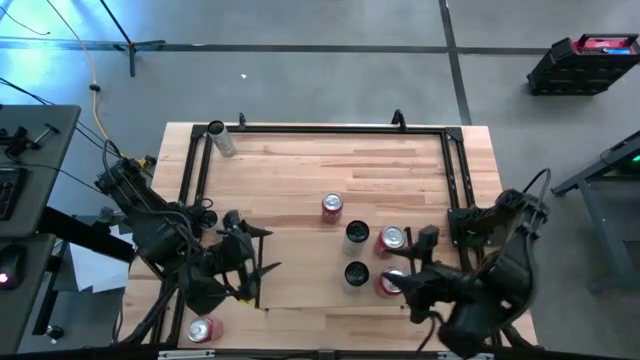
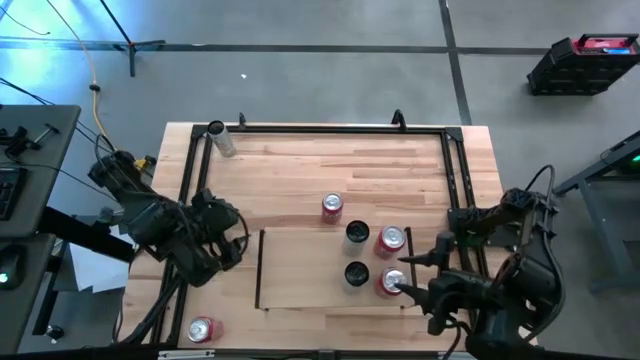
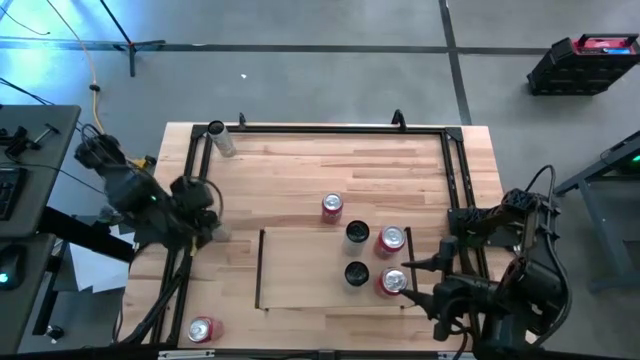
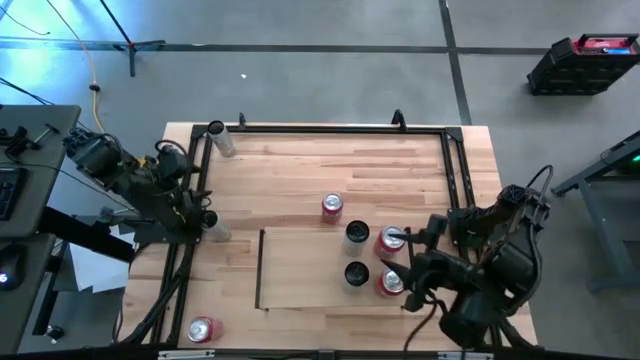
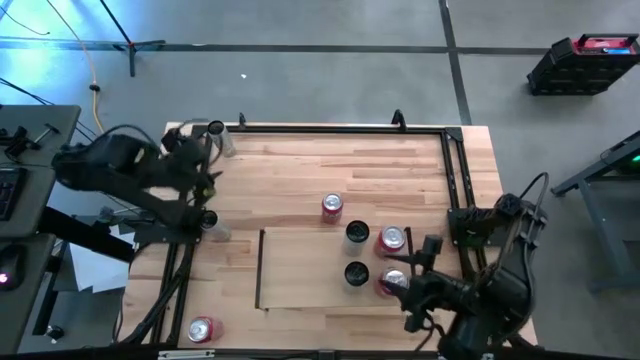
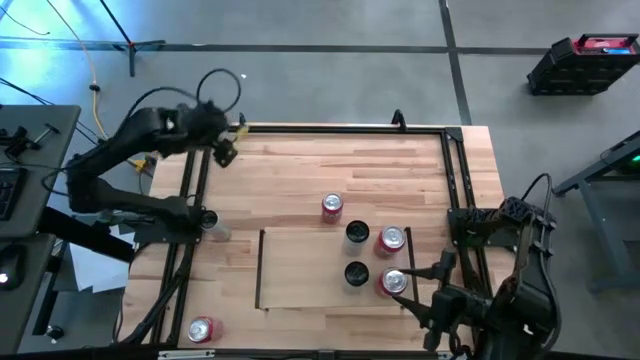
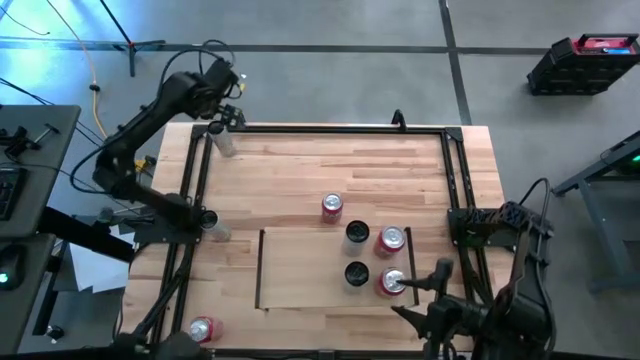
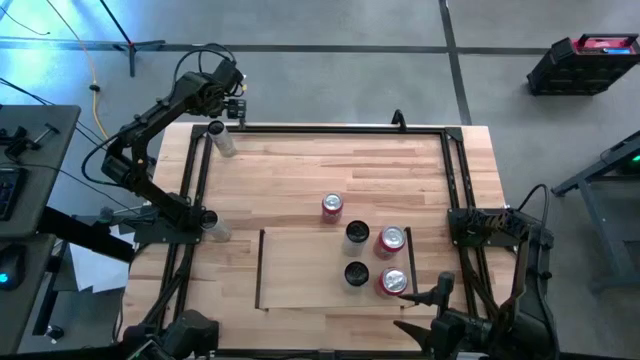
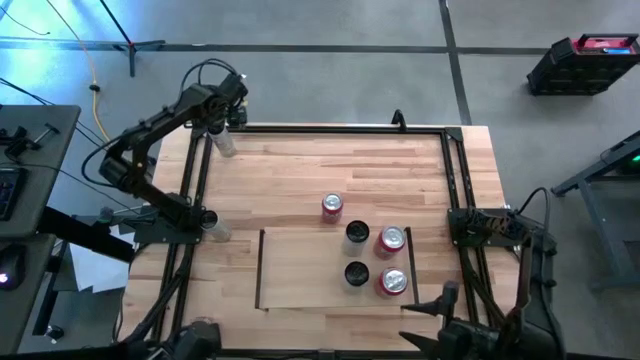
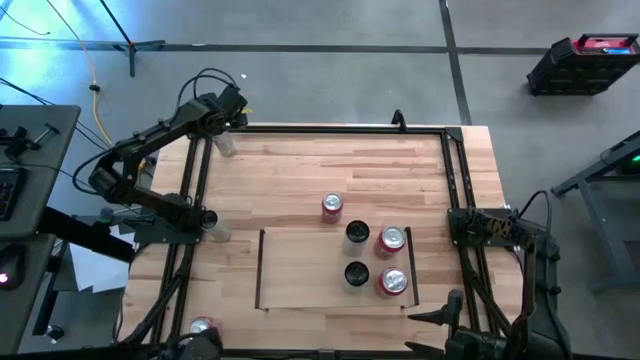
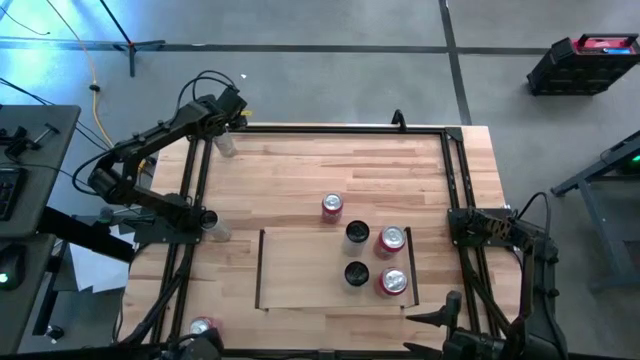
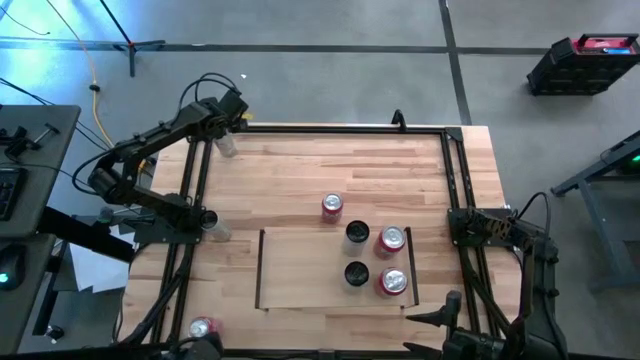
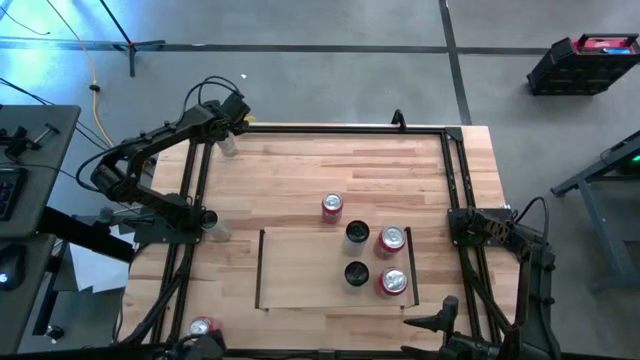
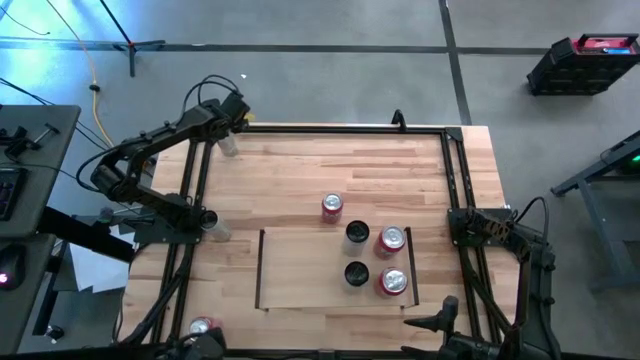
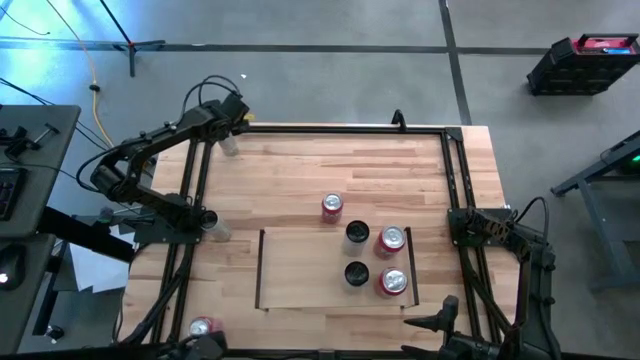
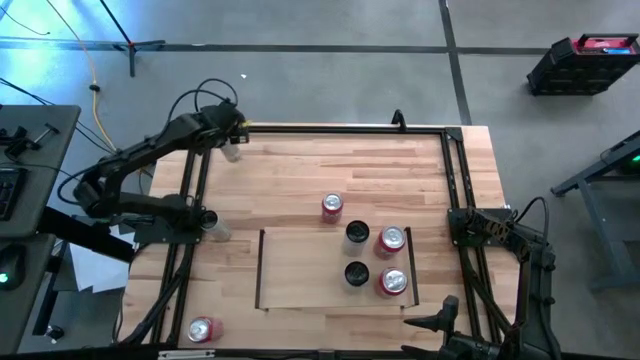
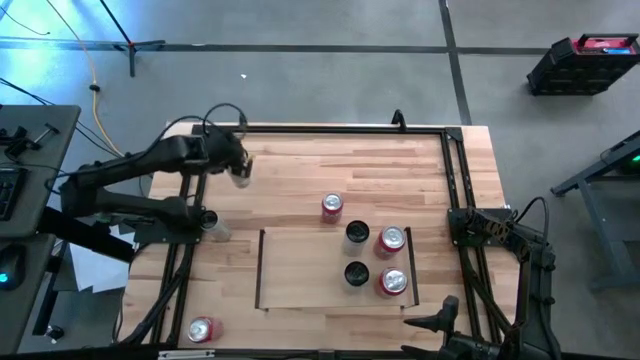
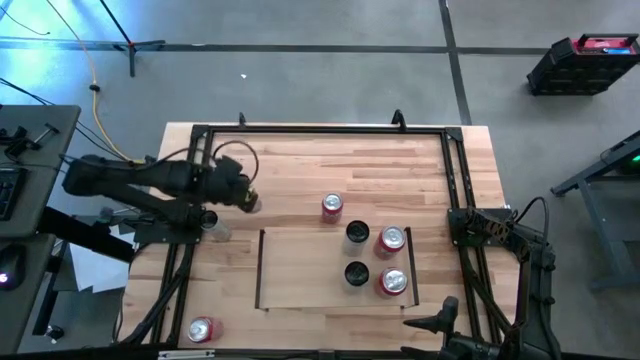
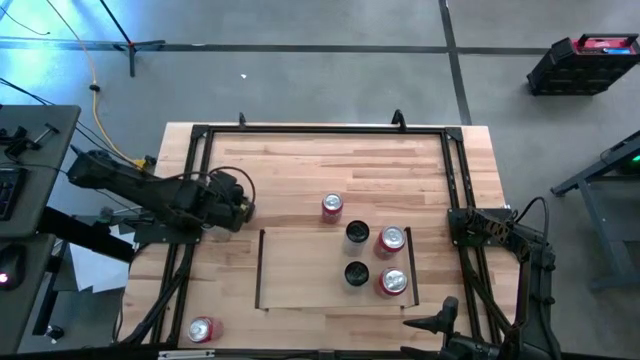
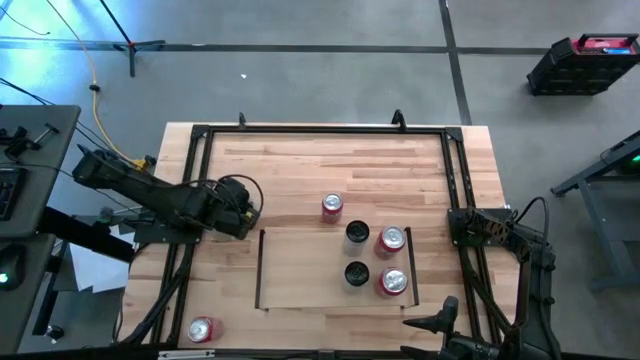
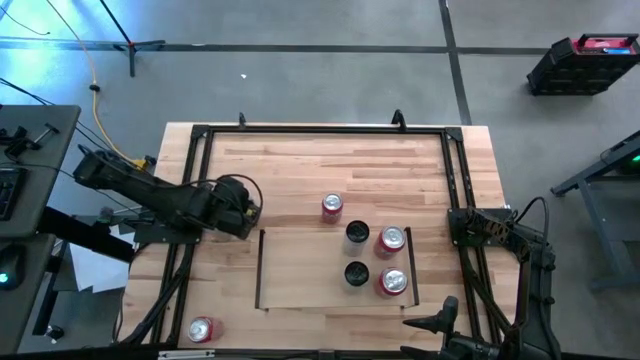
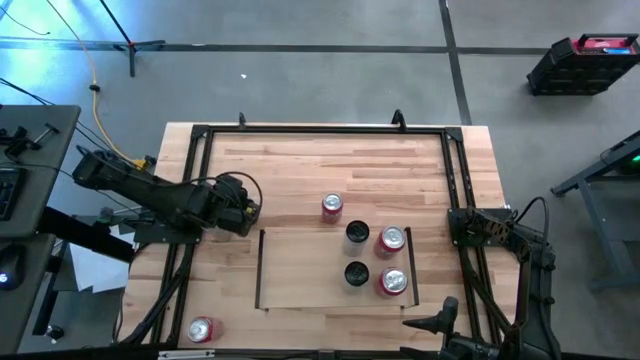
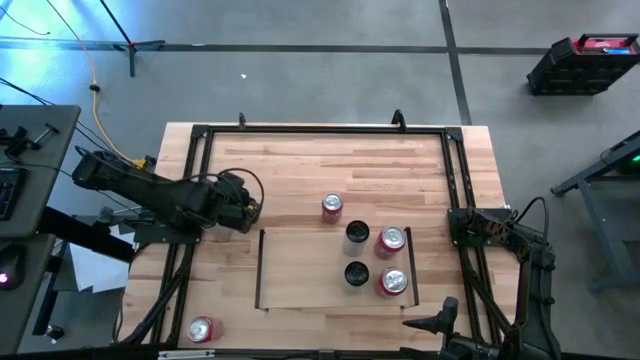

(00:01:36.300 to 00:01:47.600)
Task: Place canned beverage on shelf
Put the top white yellow soda can on the shelf
